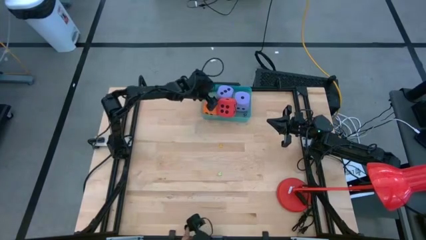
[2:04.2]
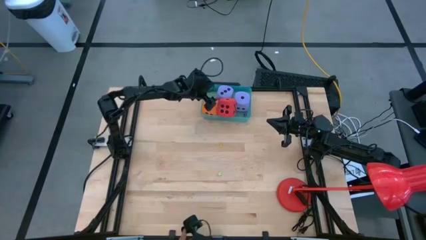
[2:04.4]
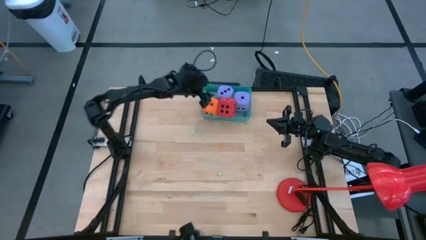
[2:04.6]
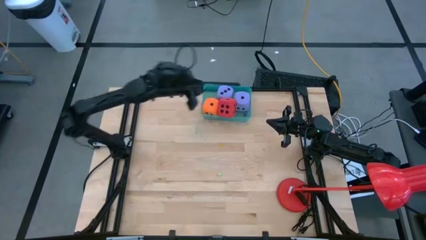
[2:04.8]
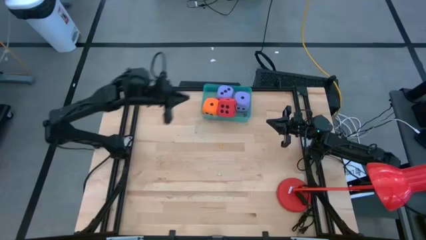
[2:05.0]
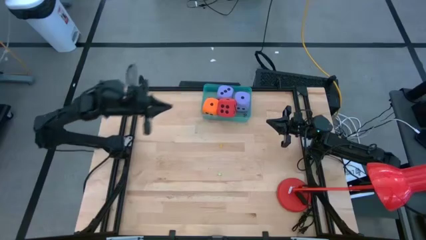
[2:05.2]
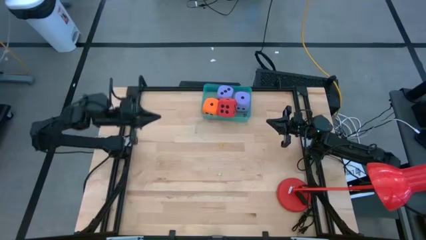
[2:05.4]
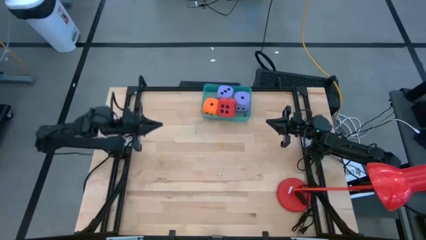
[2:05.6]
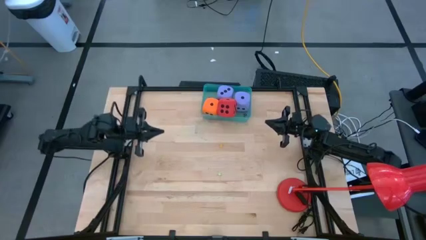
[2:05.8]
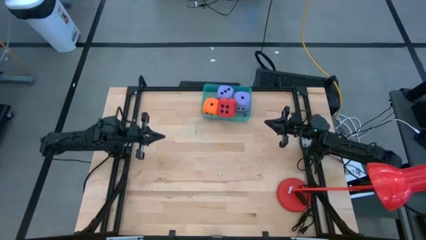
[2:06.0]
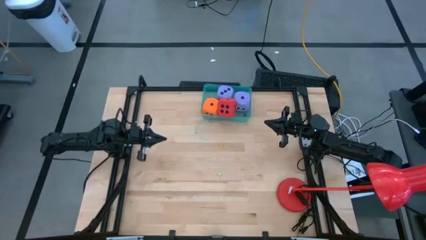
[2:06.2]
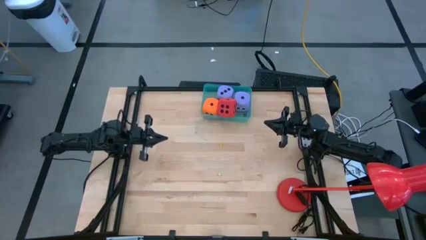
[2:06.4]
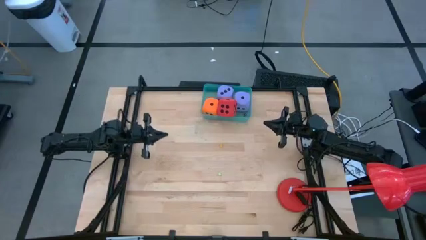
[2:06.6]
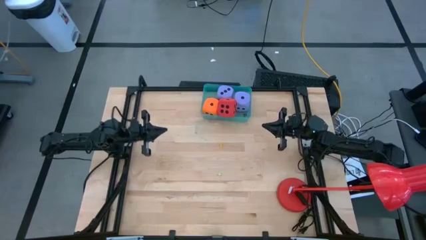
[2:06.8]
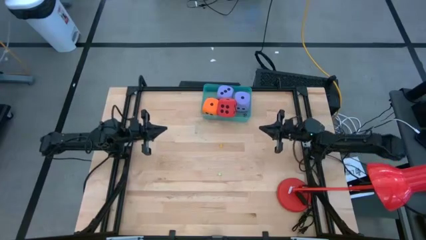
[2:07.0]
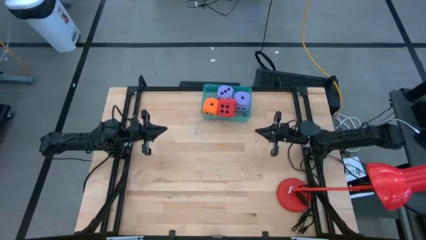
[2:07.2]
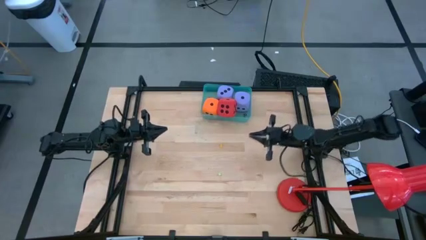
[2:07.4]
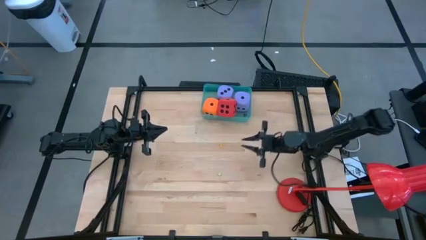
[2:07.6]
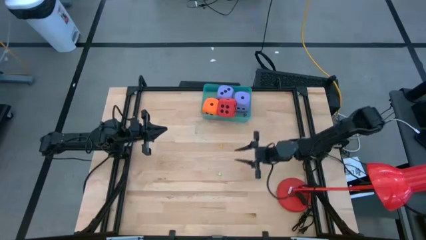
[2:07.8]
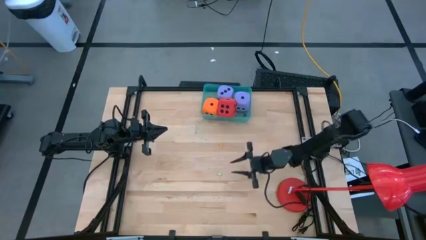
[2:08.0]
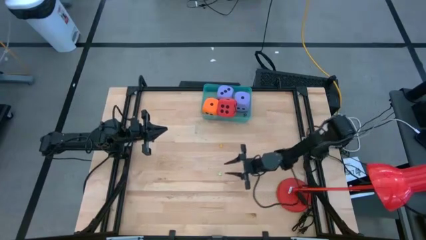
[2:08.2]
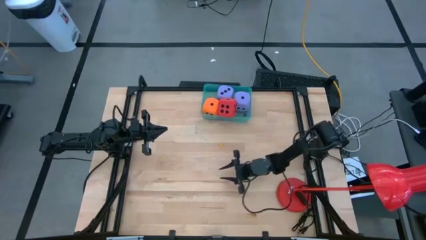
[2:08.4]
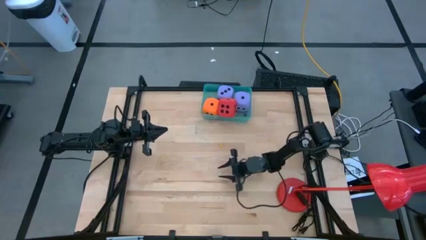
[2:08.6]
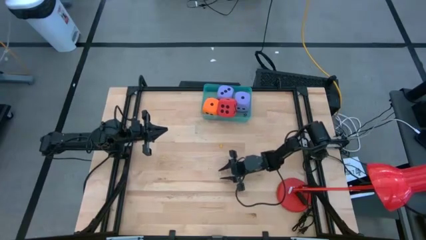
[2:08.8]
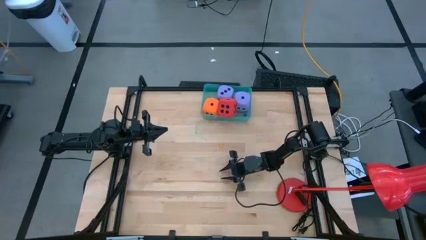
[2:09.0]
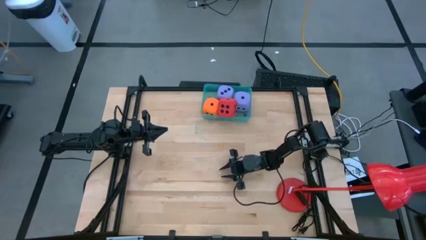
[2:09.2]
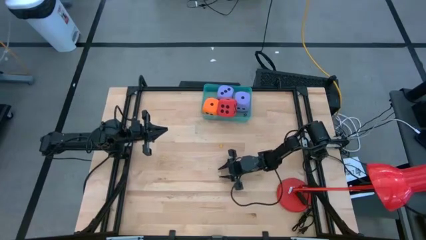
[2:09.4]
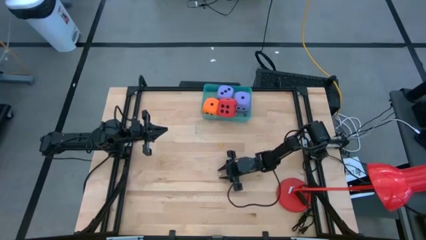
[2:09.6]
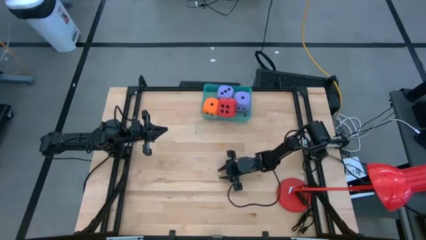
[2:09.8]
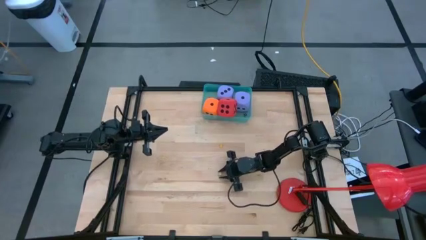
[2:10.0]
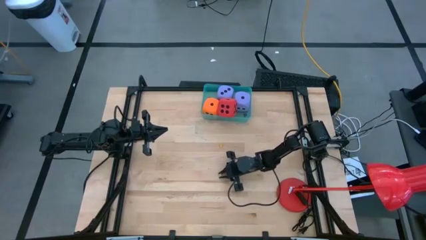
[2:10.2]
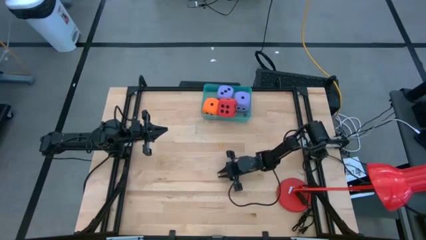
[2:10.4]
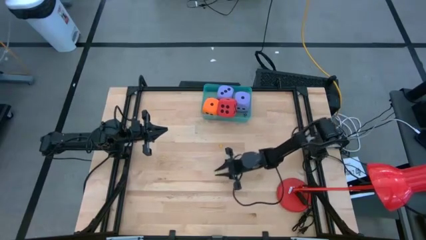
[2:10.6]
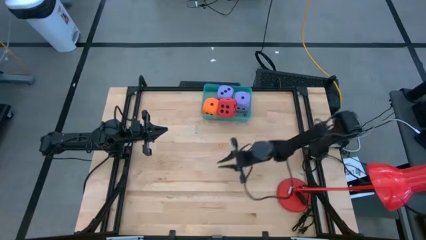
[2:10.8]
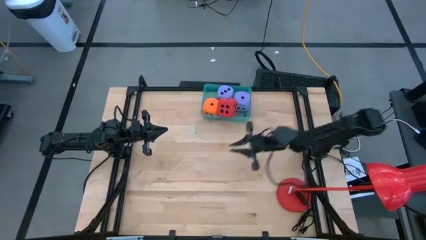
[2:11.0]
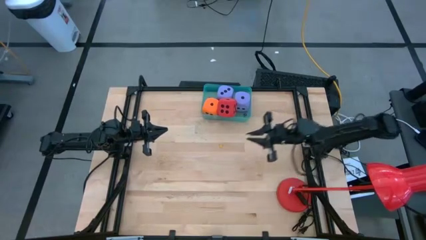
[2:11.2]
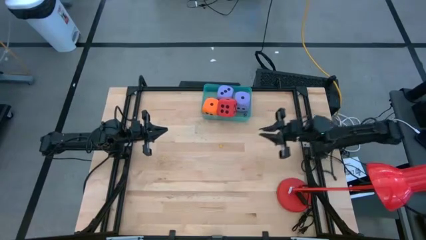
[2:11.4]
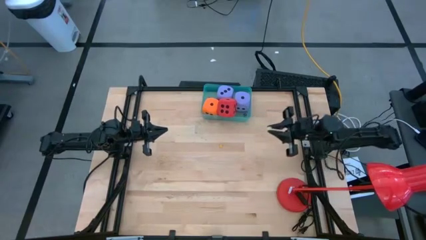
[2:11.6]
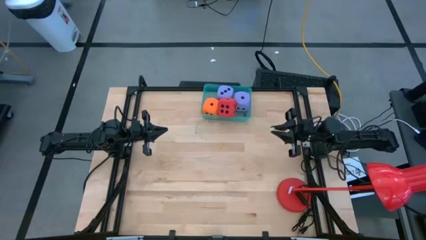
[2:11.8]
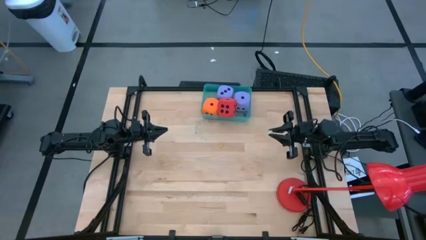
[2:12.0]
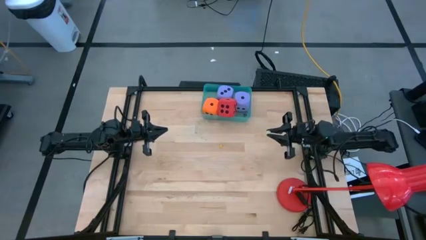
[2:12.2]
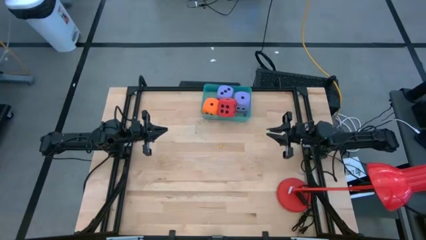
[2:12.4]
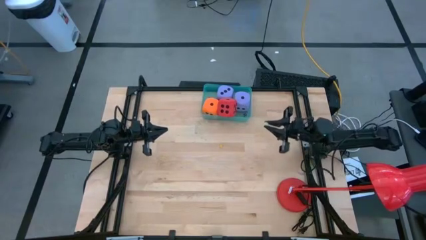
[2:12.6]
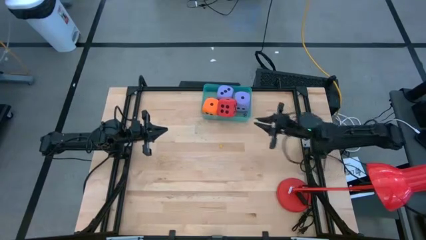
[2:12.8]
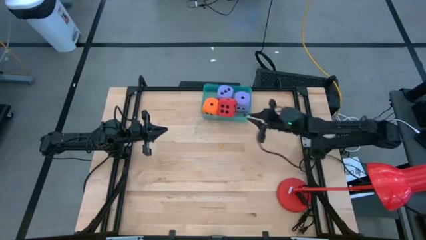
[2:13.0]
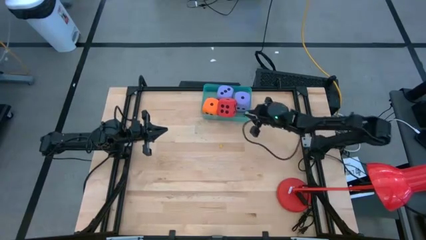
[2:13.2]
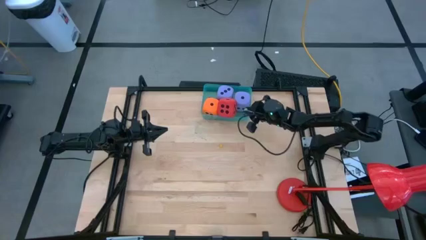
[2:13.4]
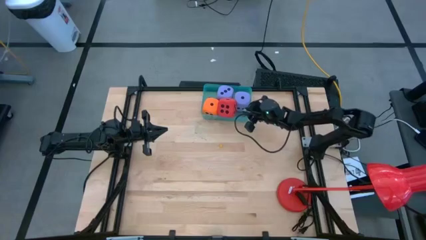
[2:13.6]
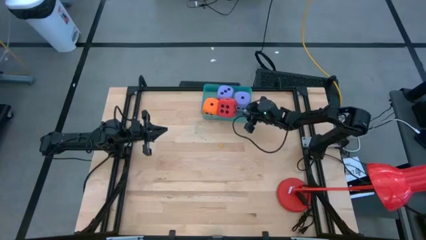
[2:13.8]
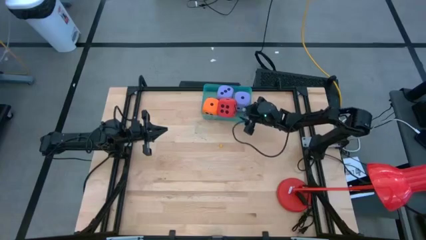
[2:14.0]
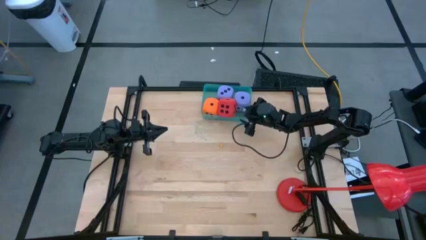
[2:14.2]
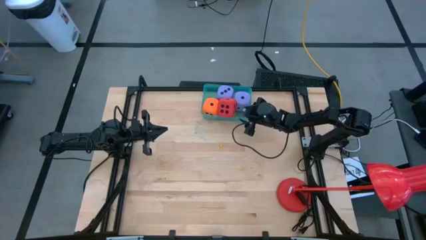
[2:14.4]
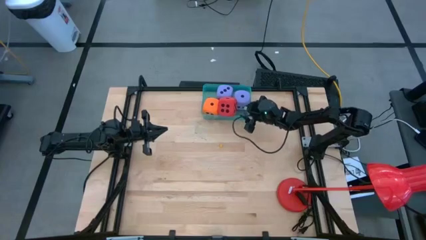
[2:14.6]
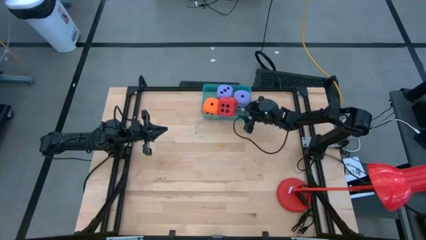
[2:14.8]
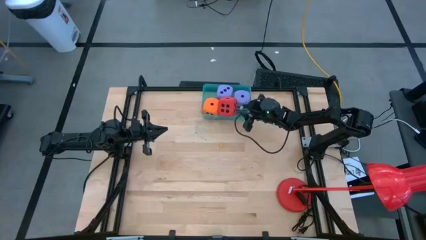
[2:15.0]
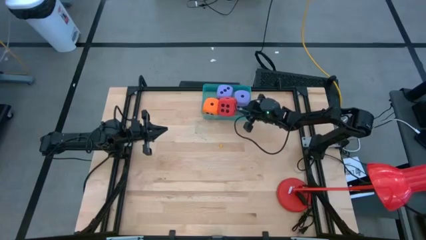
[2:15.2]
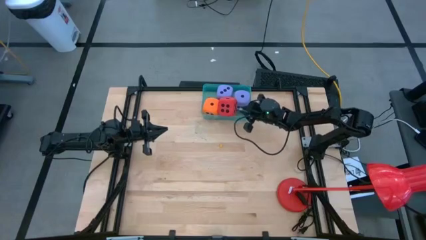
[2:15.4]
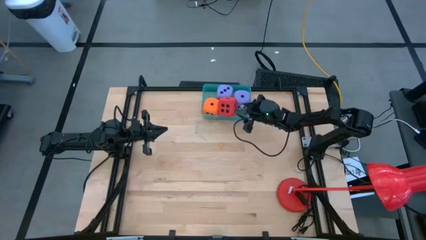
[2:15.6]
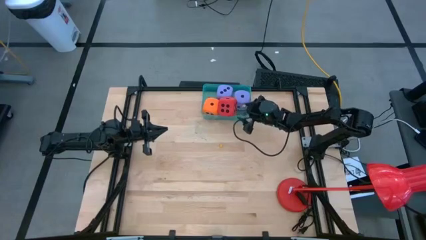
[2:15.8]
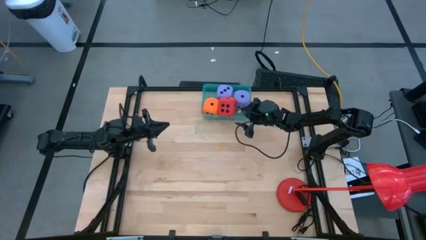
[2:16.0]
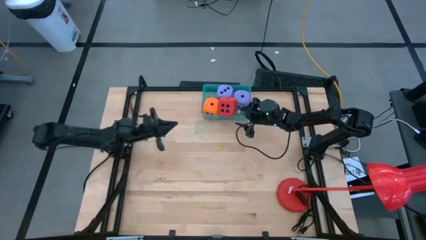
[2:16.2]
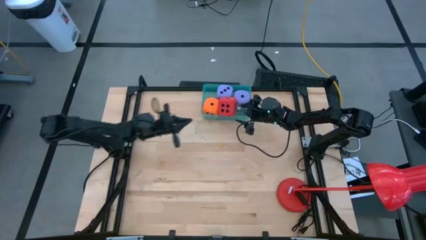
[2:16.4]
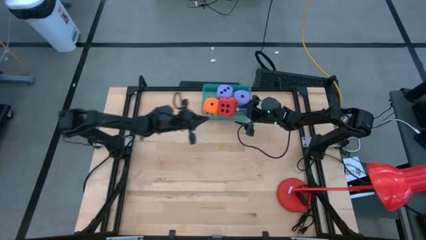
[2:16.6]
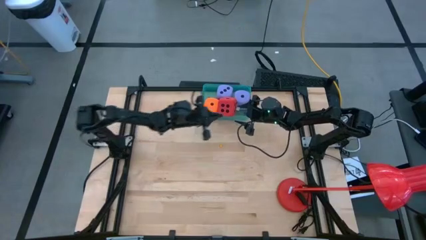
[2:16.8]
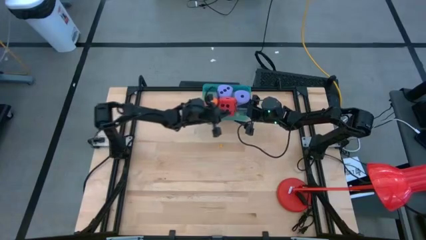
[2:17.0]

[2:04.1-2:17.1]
Task: Pick & Place Dice
Put the small light green dice into the blue transparent bin

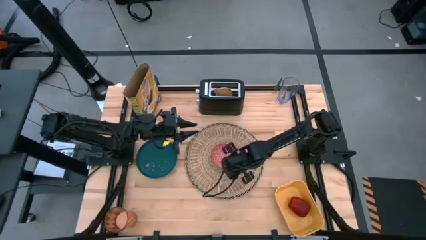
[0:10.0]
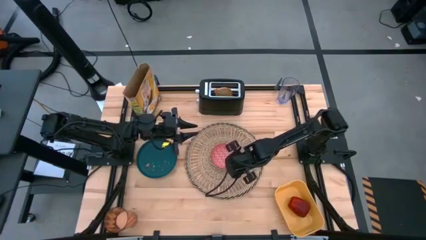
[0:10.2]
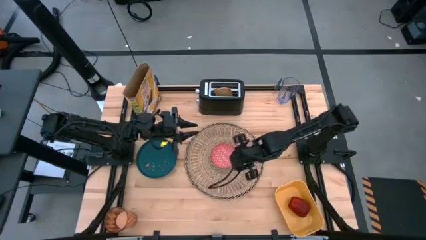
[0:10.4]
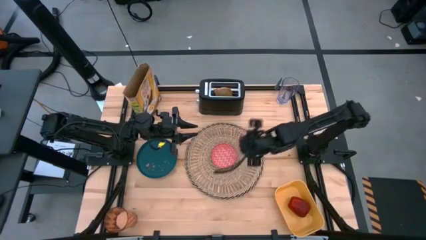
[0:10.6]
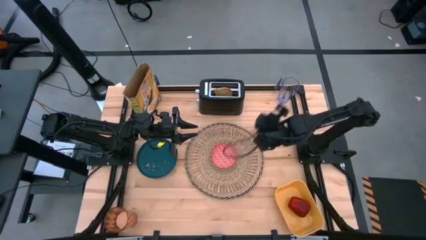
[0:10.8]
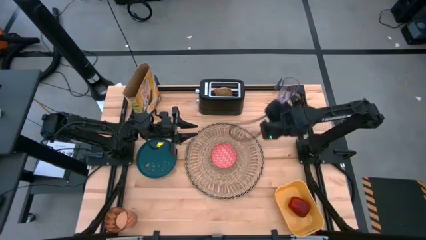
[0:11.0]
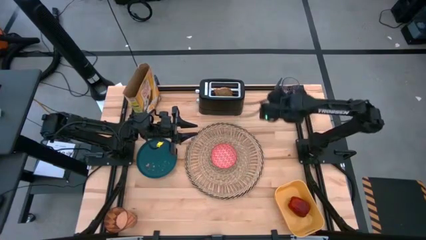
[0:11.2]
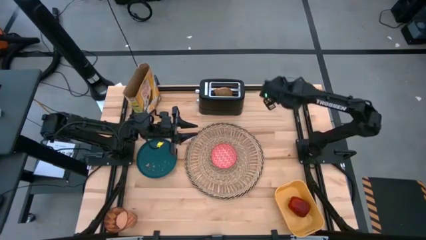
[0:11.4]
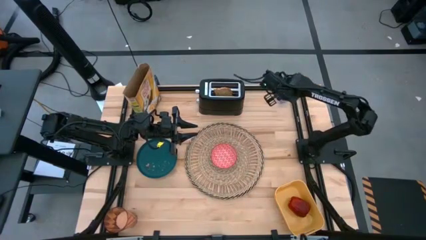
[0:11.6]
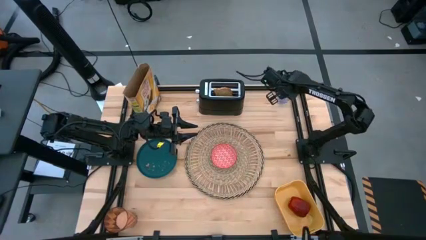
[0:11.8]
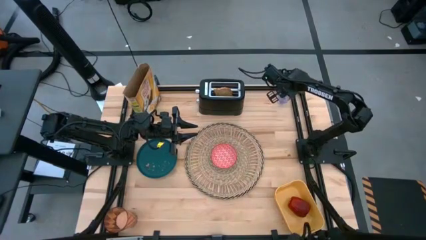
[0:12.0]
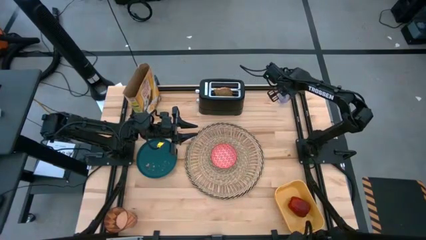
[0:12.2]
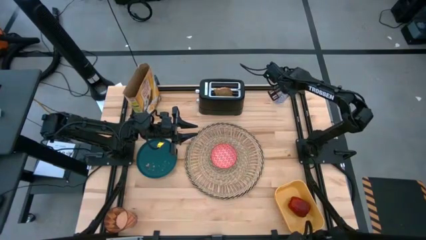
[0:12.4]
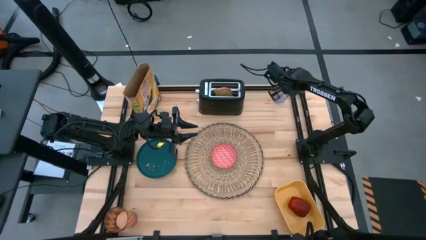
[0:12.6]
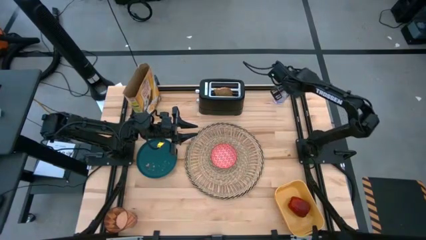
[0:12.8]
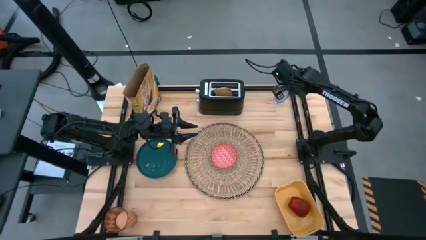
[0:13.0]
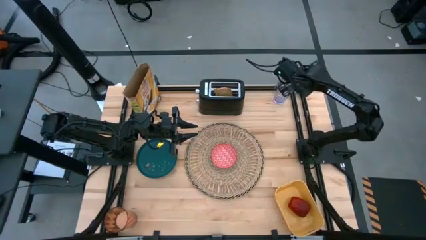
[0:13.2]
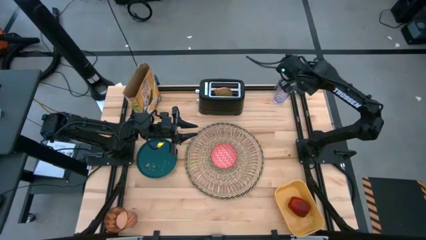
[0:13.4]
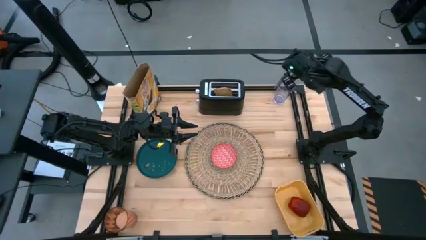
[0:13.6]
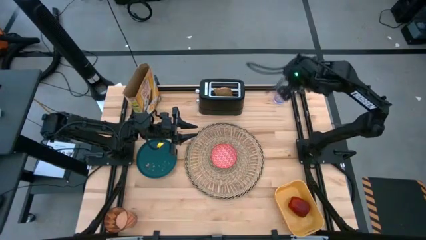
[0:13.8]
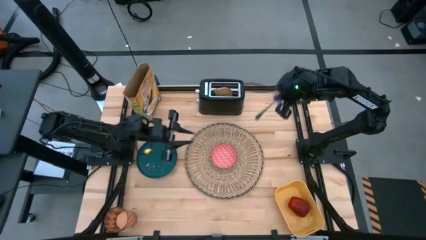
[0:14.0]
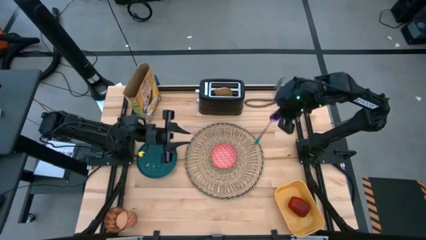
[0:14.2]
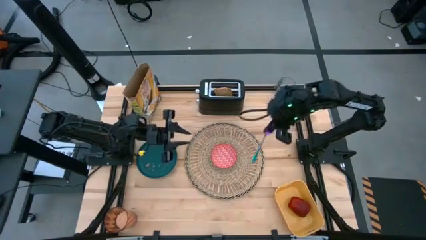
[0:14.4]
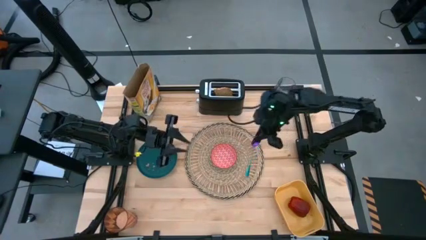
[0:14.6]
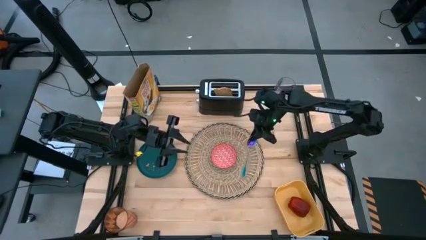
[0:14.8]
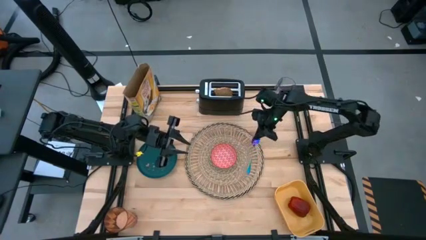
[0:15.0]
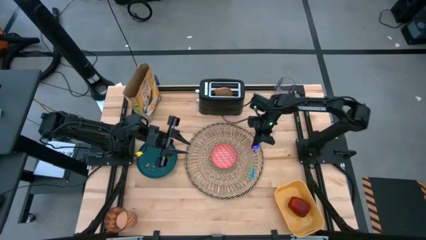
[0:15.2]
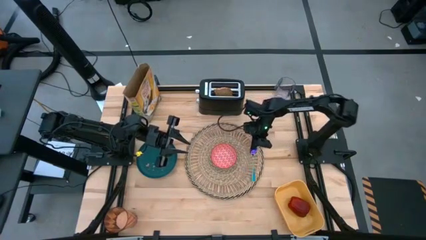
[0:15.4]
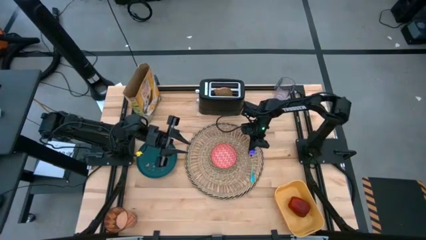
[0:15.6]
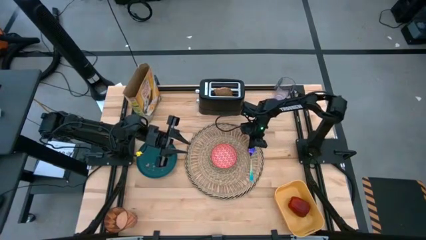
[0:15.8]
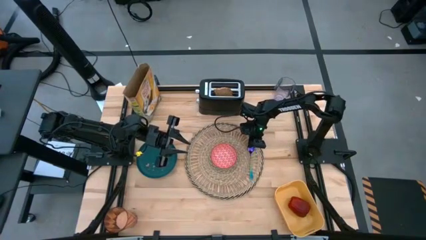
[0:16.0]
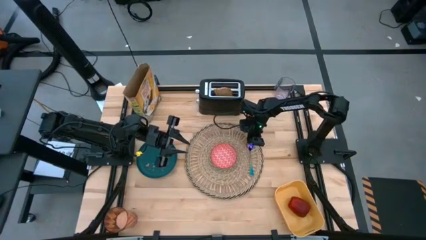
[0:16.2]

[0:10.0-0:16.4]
Task: Arrange a breakfast setting
Put the iridescent blue spoon on the brown table mat to the right of the red bowl
